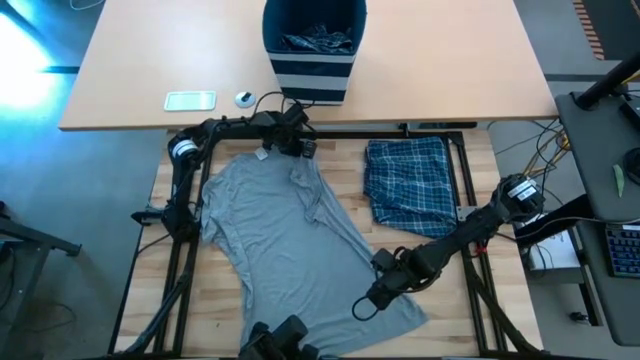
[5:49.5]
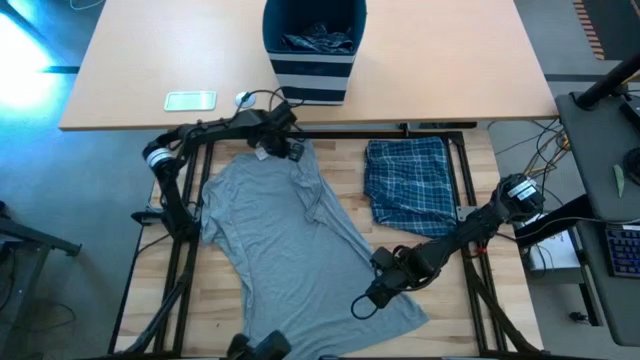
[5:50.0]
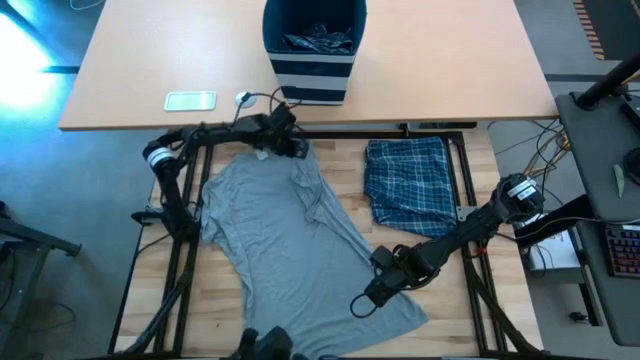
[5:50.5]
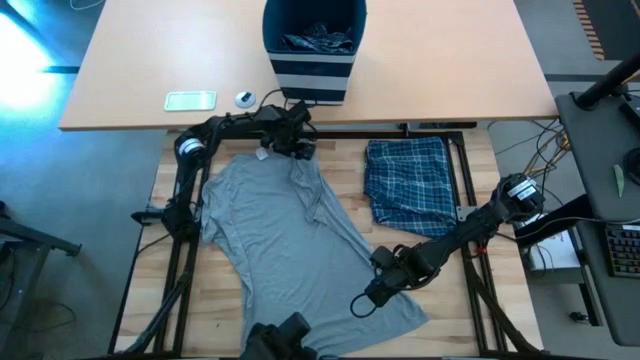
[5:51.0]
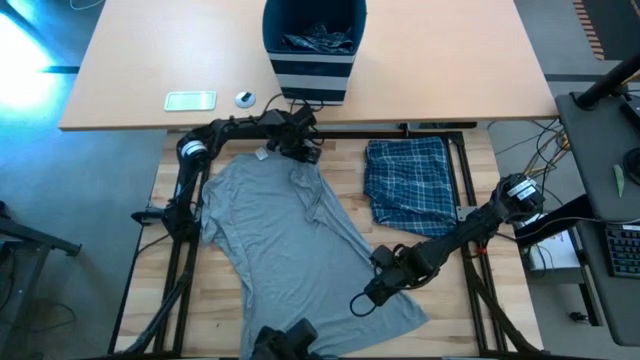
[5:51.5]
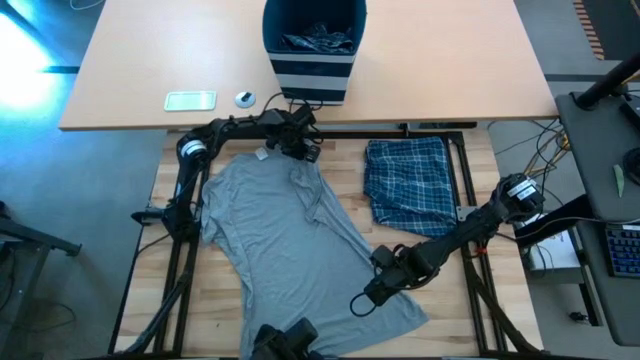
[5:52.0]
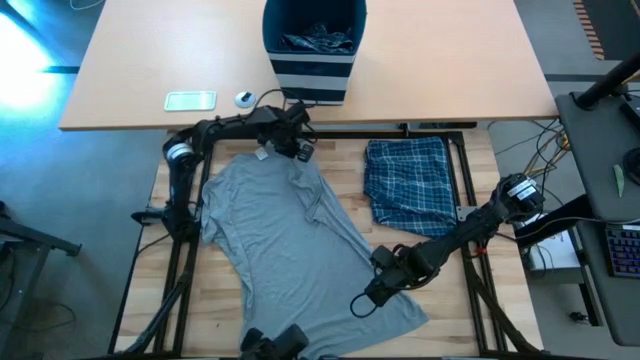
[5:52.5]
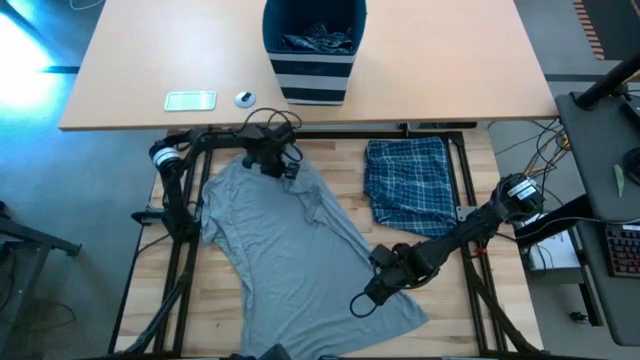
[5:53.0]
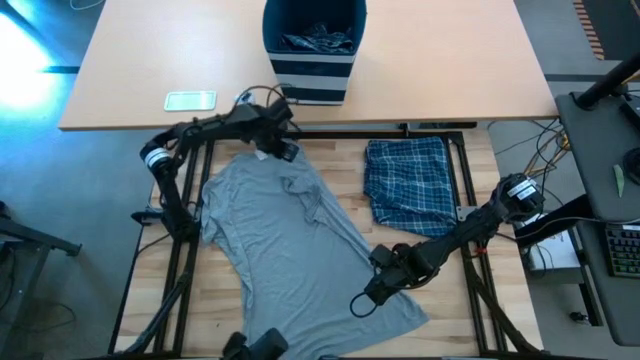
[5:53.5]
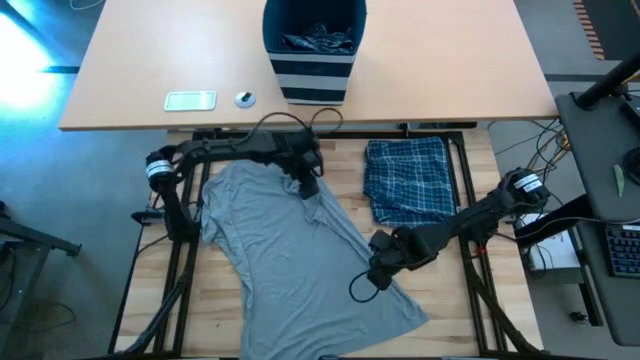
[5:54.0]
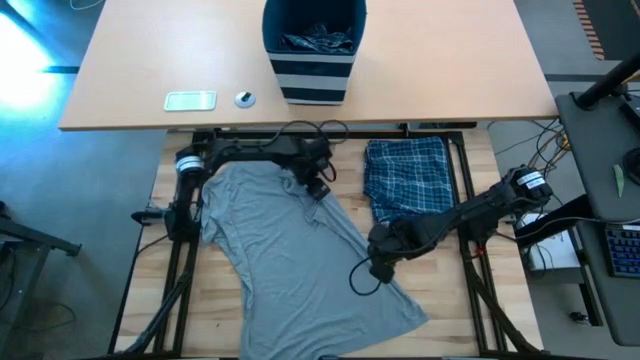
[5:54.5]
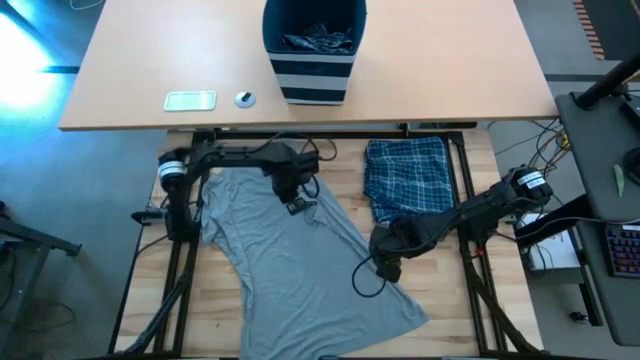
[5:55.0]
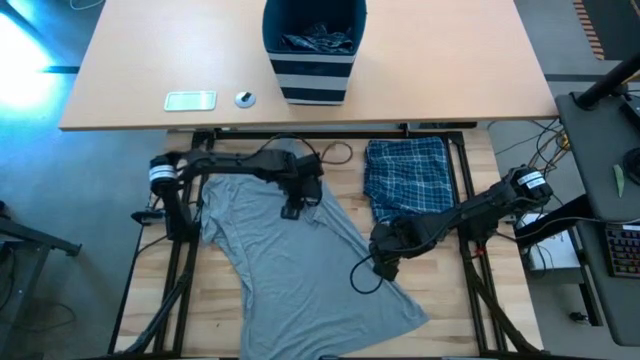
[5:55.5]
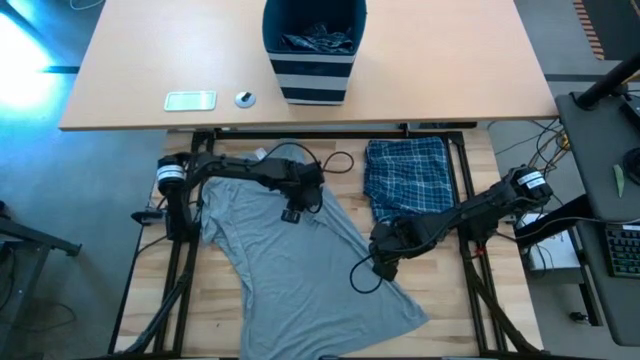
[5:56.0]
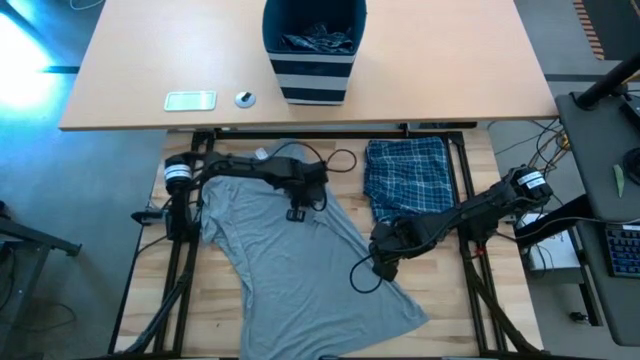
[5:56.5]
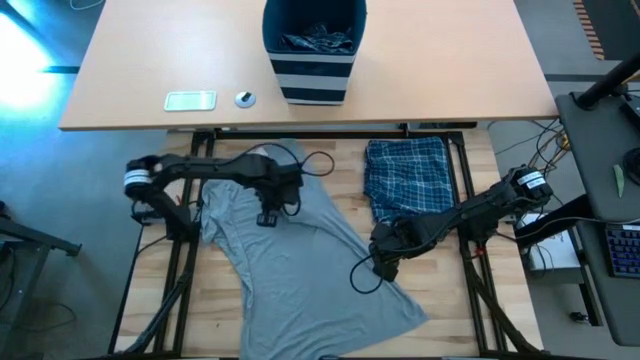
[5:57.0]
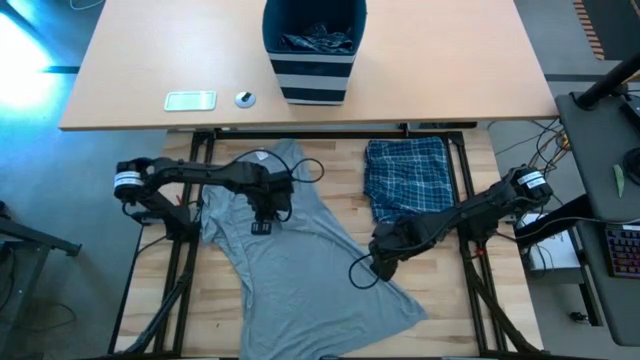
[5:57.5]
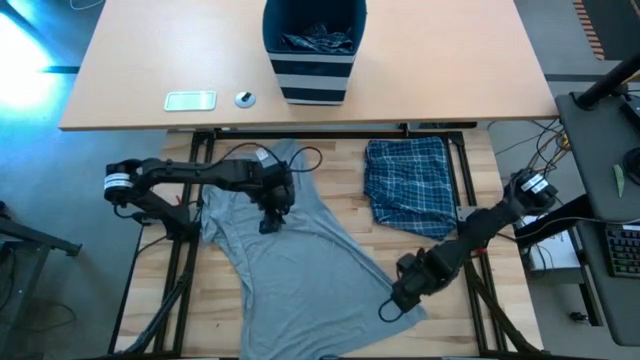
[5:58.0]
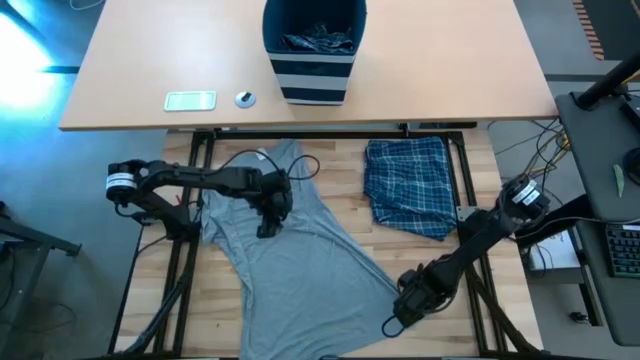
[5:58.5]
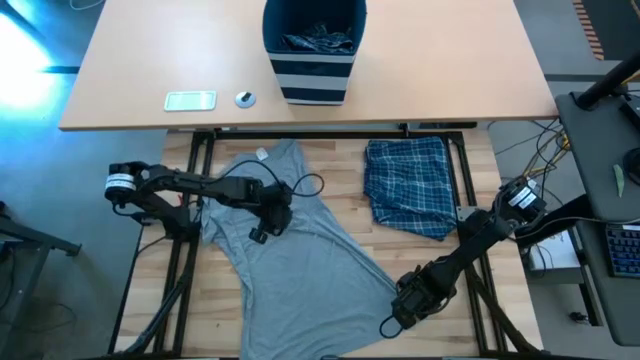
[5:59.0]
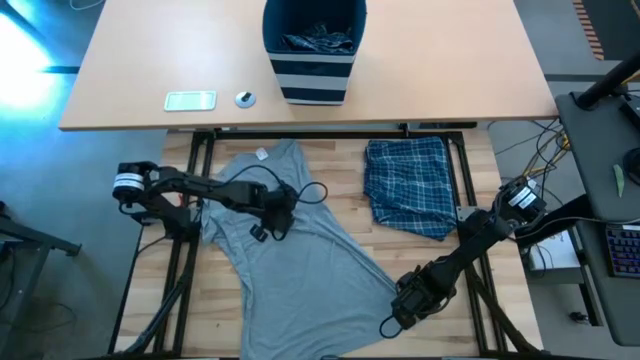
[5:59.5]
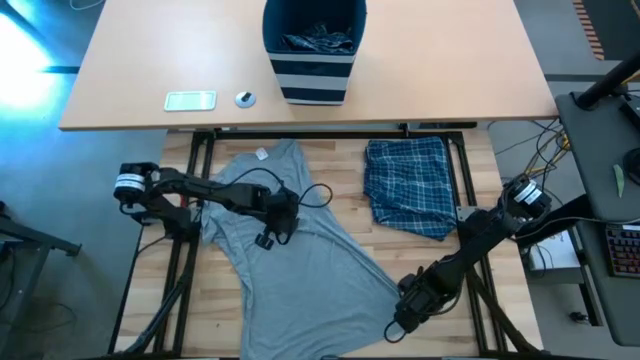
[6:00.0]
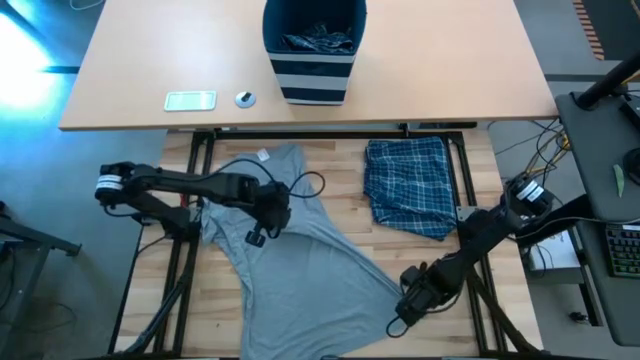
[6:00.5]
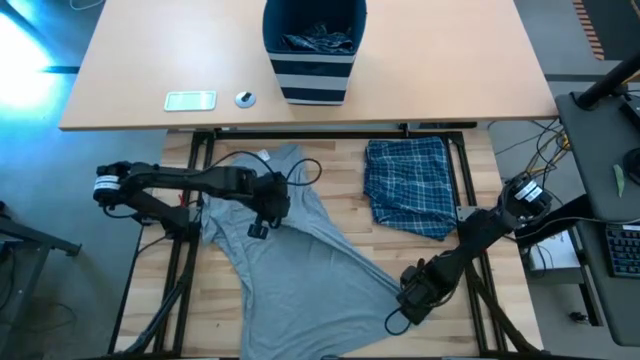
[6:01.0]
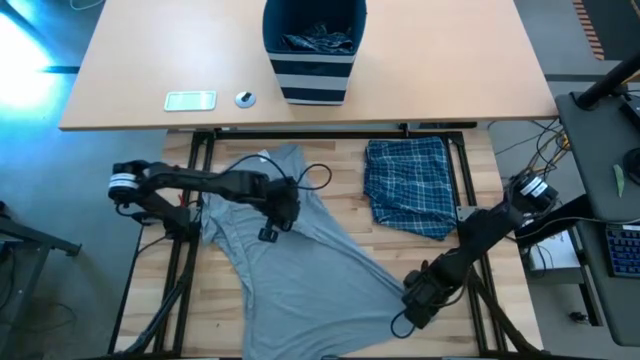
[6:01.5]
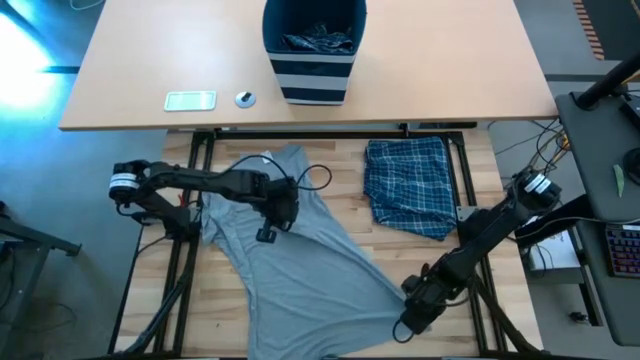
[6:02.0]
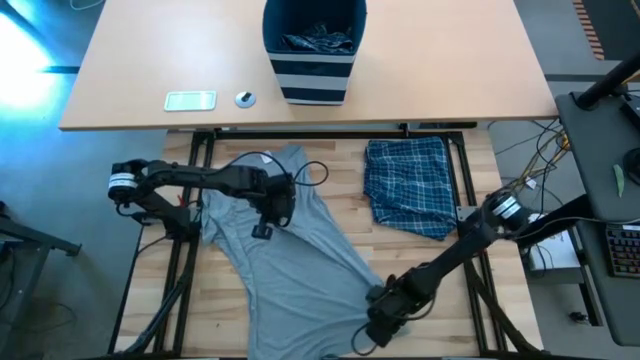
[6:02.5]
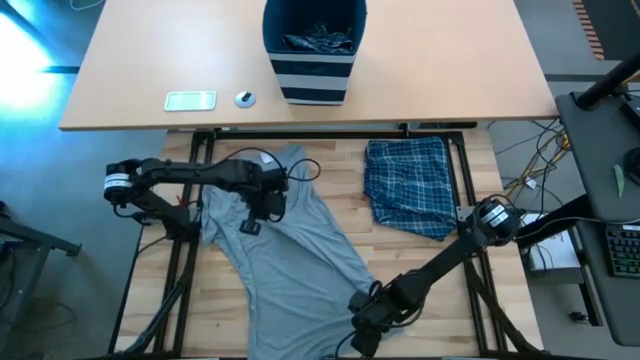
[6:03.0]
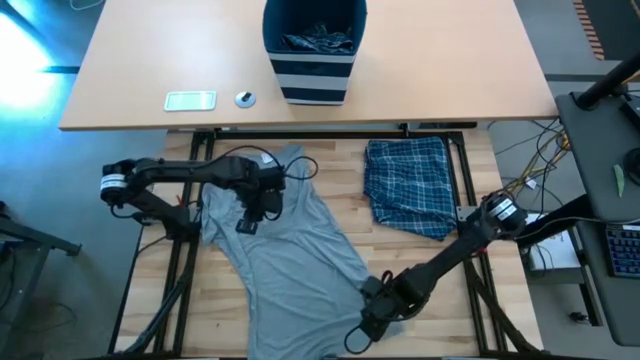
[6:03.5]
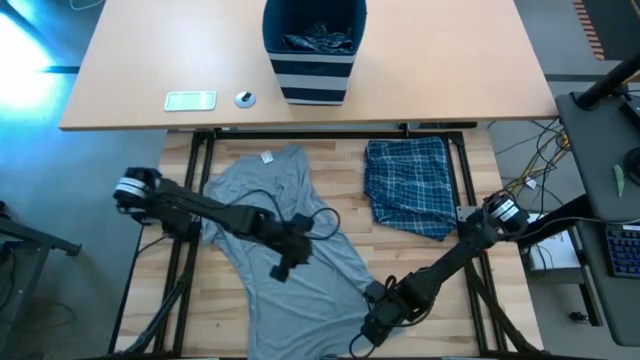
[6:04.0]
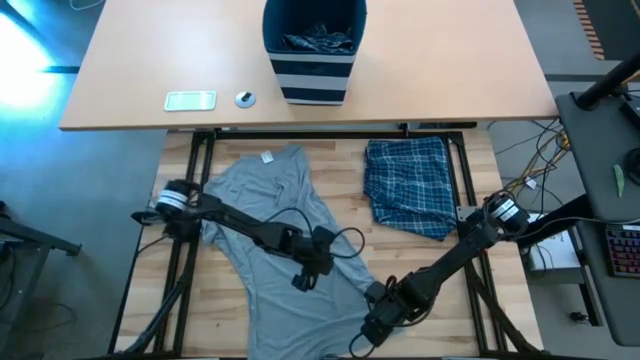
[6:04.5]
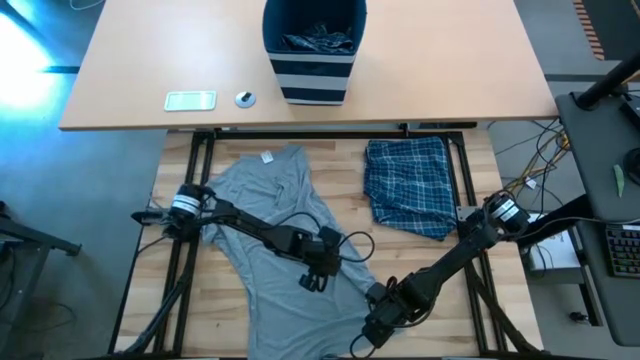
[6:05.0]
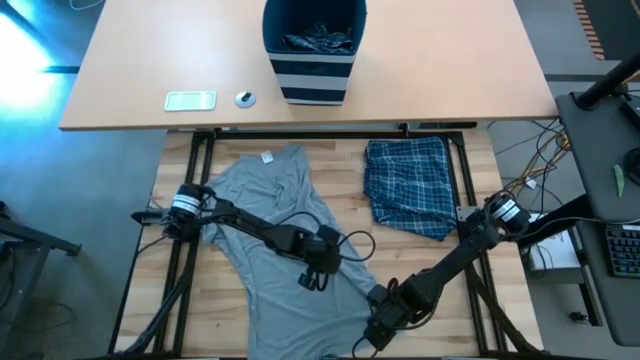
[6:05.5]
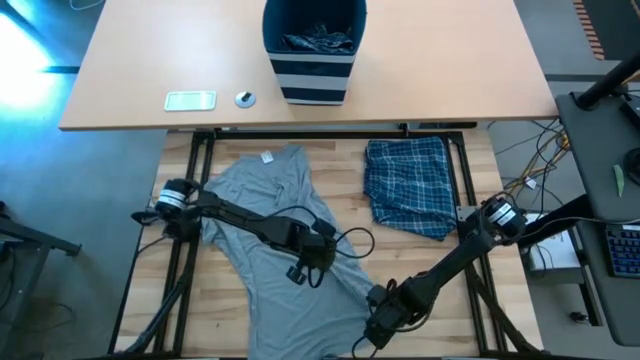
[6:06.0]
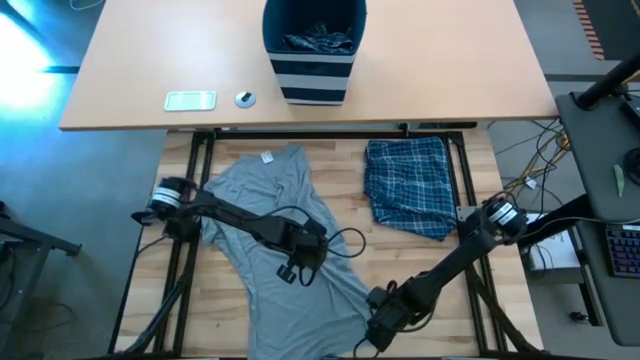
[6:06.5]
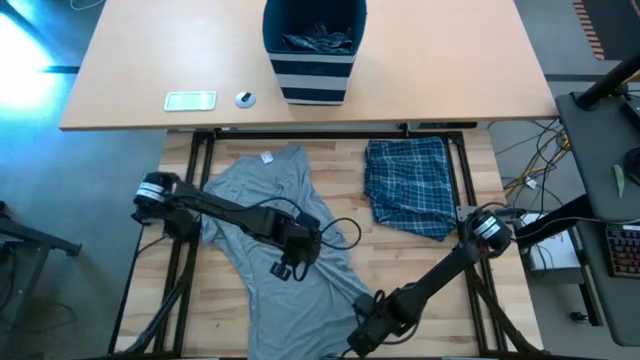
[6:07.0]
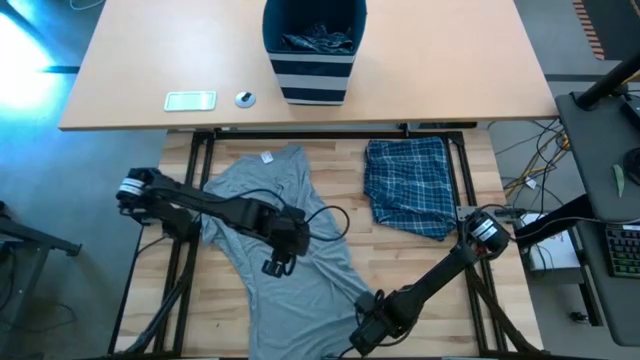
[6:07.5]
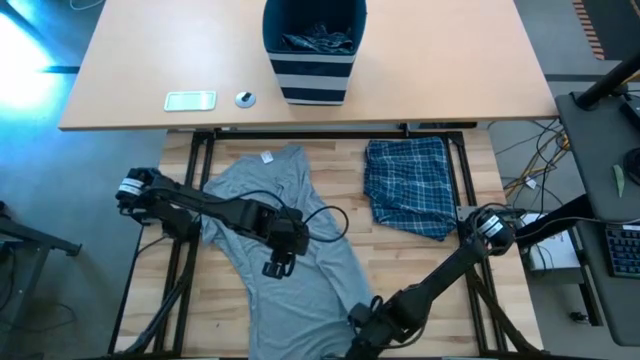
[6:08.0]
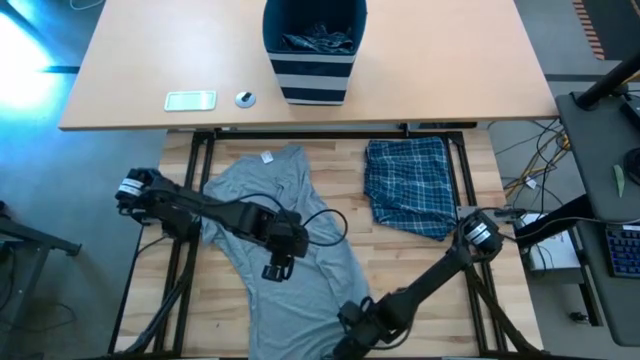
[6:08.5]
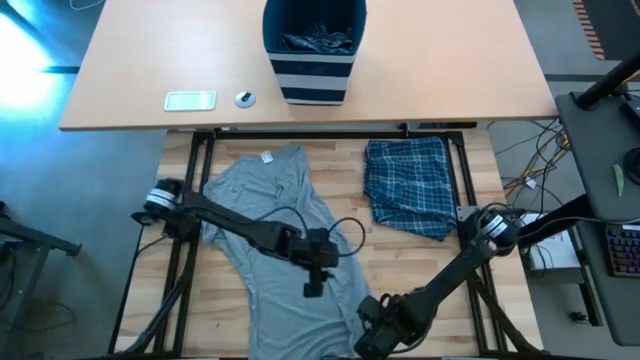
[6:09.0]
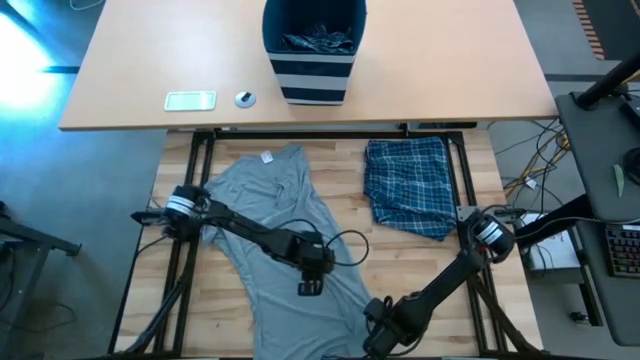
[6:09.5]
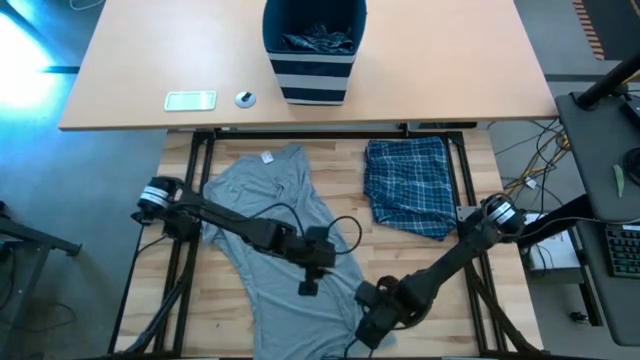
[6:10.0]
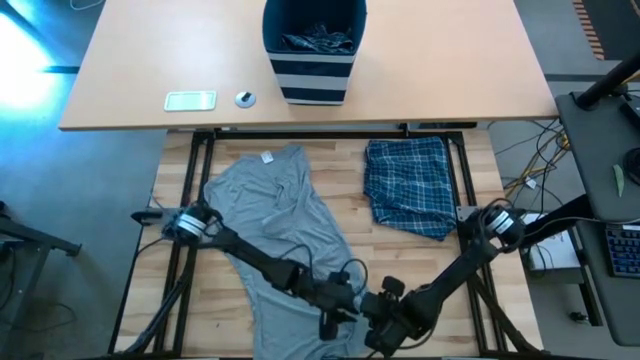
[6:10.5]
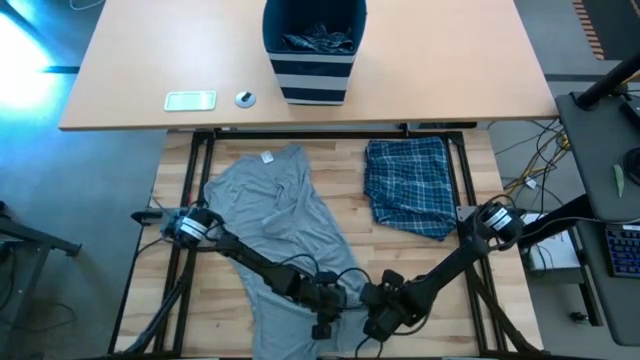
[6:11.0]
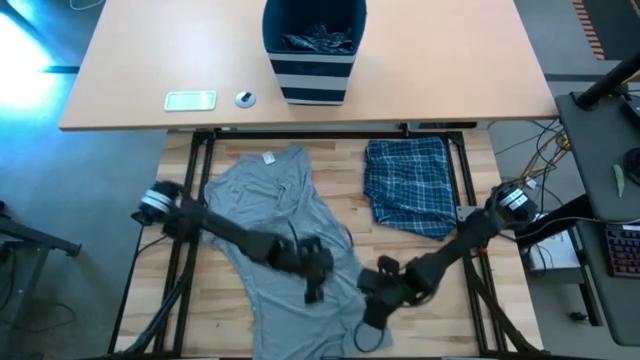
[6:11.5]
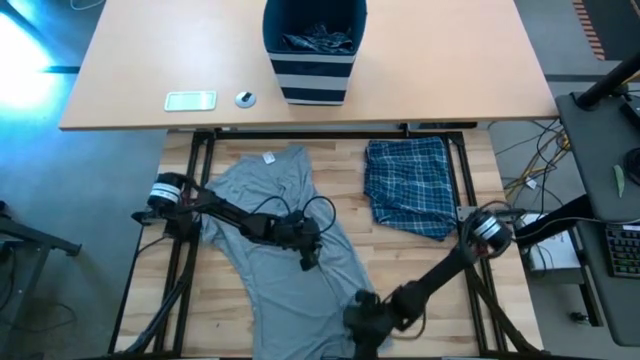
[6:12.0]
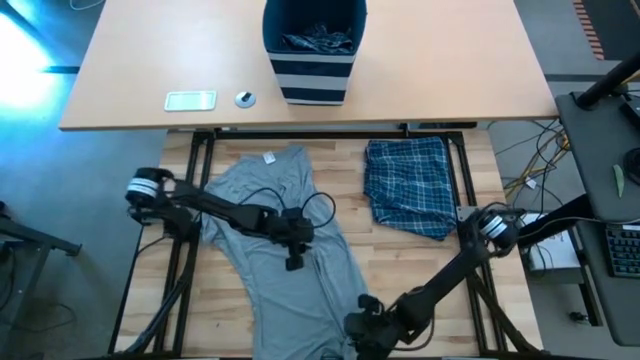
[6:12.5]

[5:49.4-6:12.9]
Task: Fold Laundry from Bin
Fold the gray shirt
